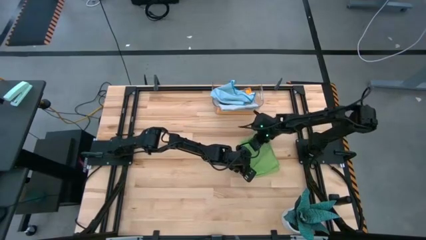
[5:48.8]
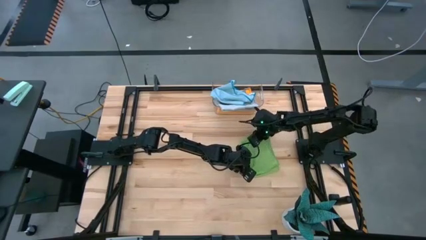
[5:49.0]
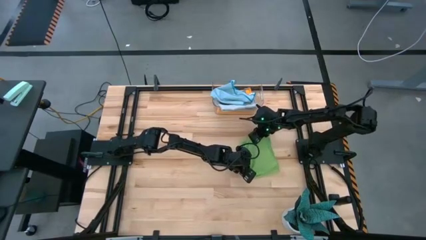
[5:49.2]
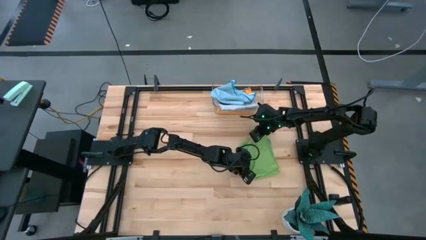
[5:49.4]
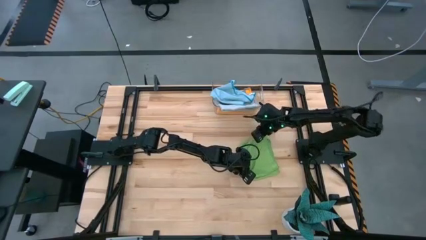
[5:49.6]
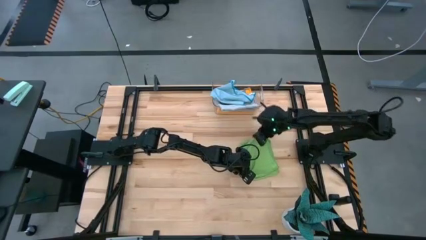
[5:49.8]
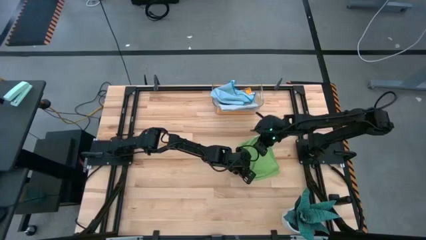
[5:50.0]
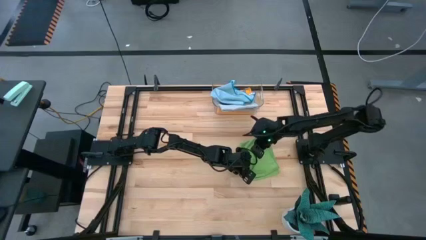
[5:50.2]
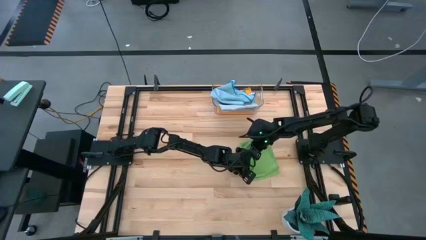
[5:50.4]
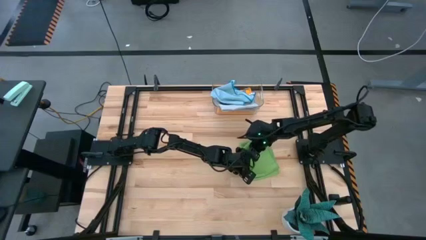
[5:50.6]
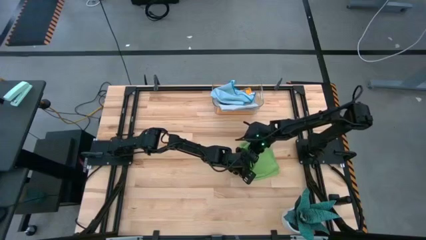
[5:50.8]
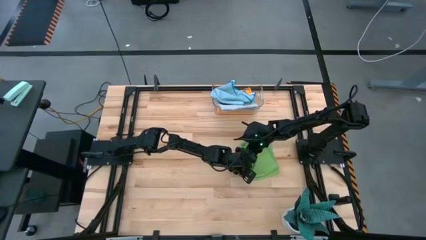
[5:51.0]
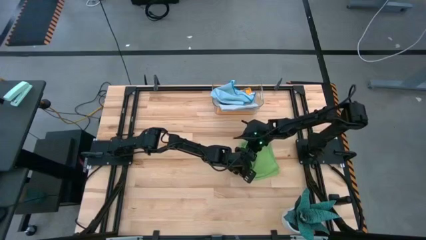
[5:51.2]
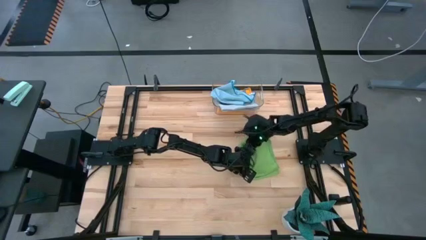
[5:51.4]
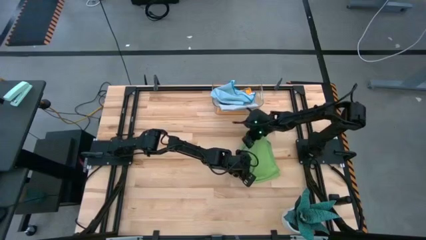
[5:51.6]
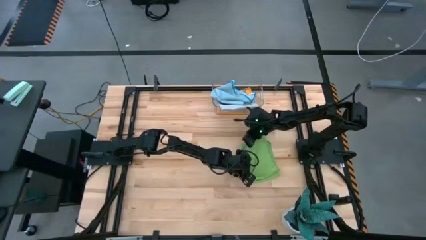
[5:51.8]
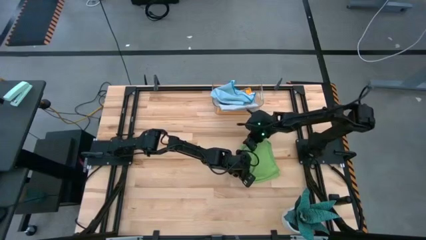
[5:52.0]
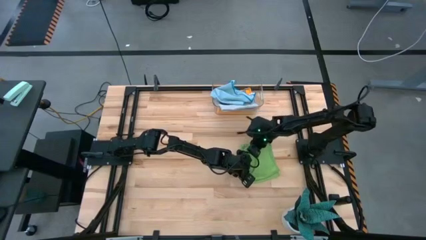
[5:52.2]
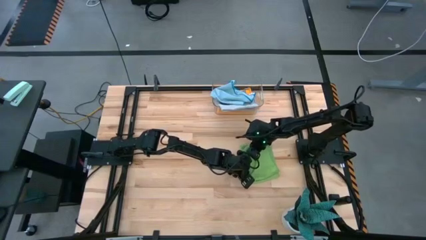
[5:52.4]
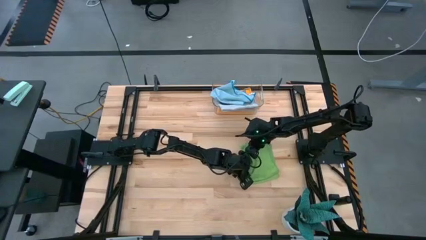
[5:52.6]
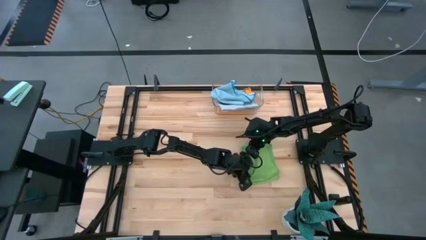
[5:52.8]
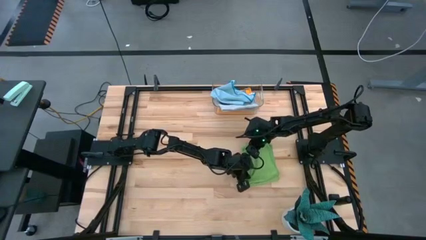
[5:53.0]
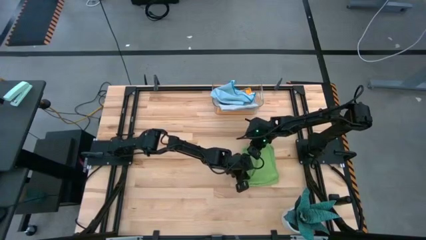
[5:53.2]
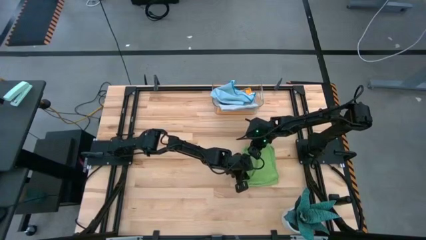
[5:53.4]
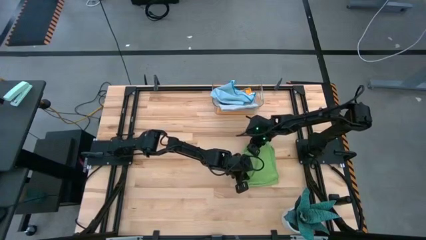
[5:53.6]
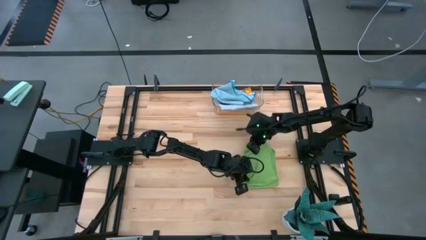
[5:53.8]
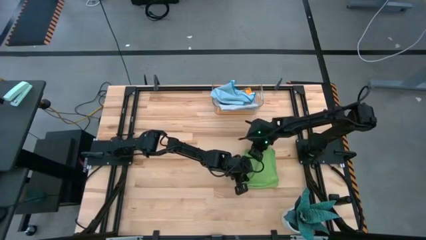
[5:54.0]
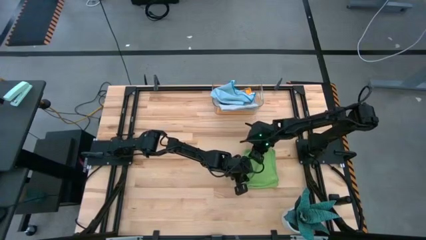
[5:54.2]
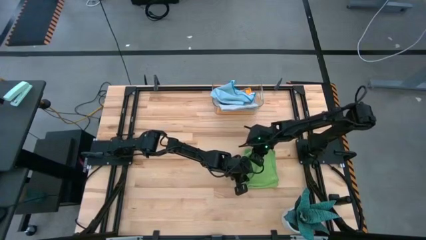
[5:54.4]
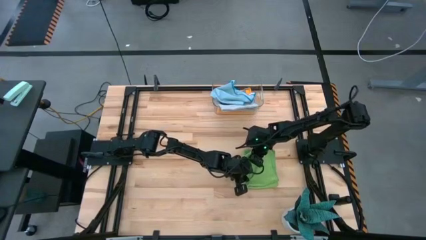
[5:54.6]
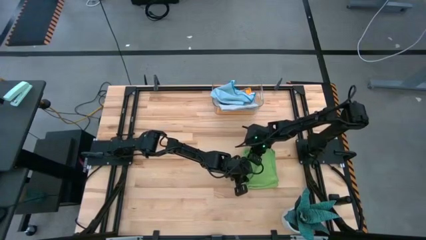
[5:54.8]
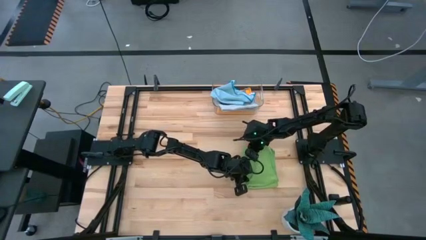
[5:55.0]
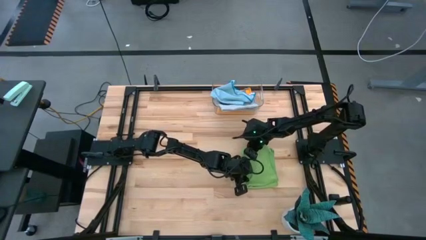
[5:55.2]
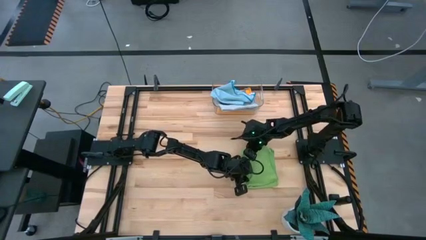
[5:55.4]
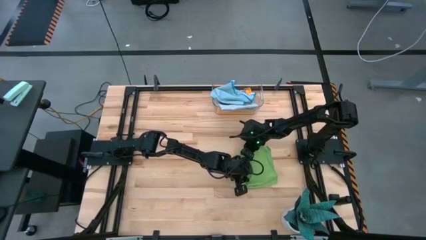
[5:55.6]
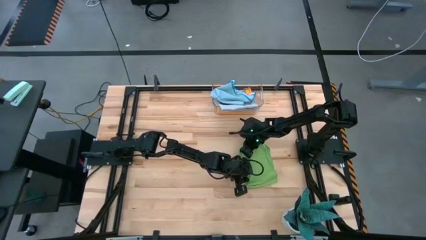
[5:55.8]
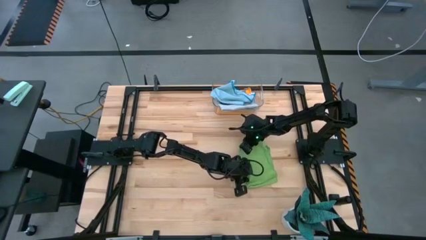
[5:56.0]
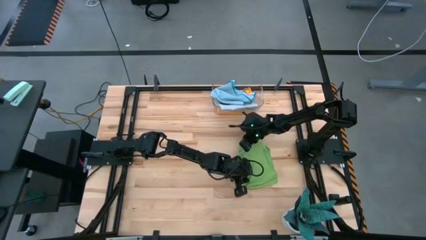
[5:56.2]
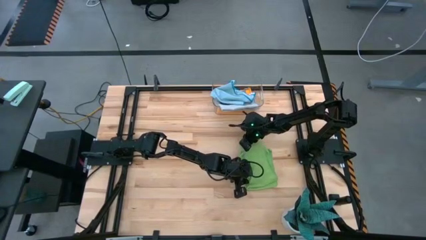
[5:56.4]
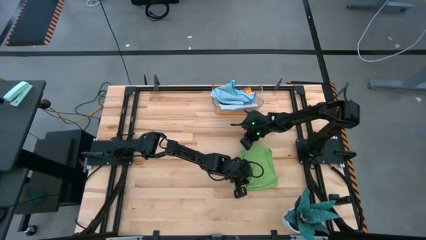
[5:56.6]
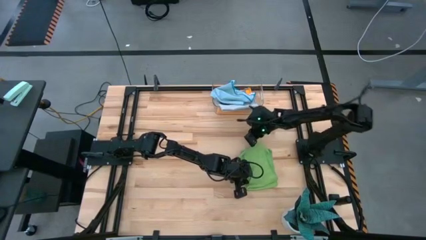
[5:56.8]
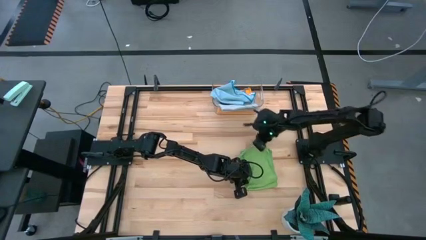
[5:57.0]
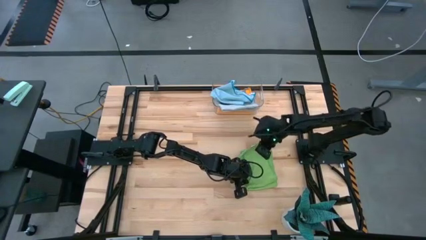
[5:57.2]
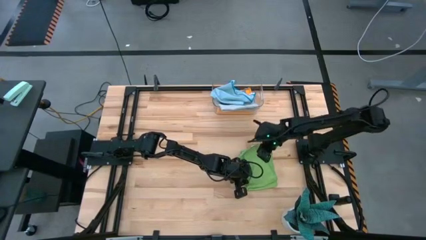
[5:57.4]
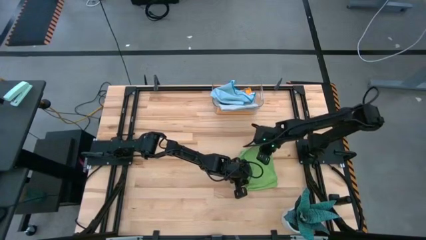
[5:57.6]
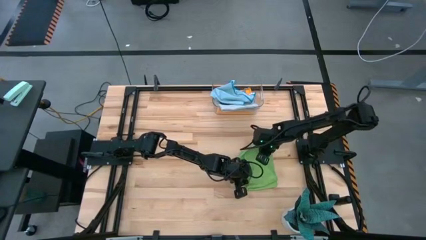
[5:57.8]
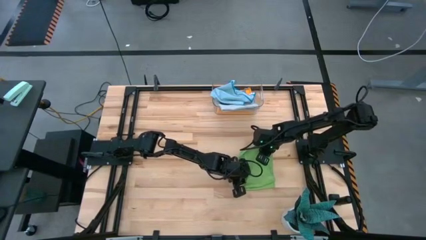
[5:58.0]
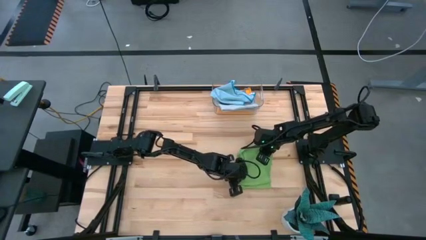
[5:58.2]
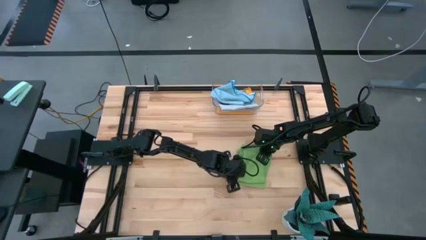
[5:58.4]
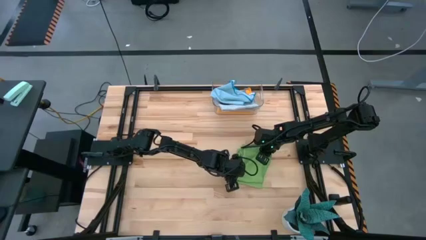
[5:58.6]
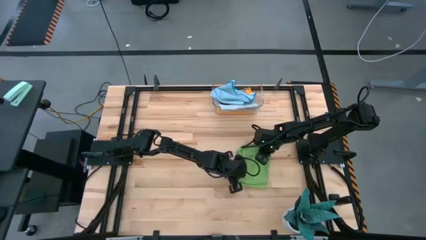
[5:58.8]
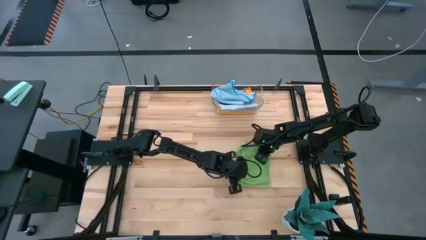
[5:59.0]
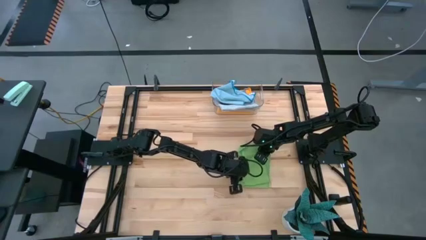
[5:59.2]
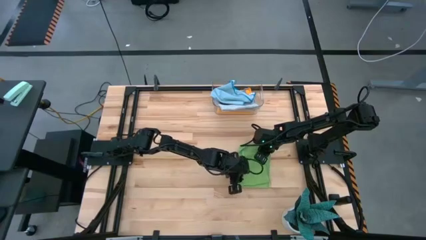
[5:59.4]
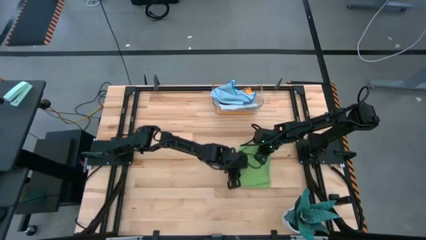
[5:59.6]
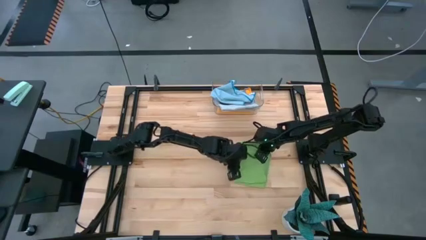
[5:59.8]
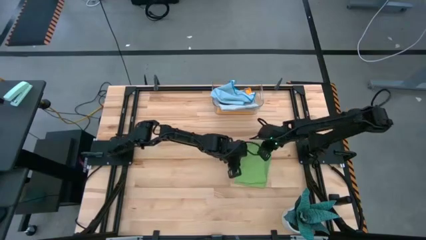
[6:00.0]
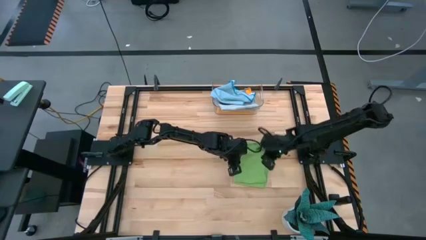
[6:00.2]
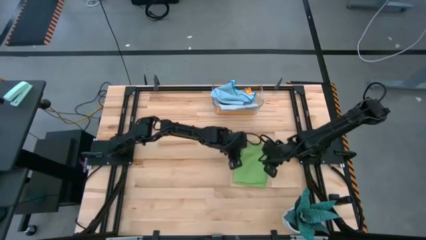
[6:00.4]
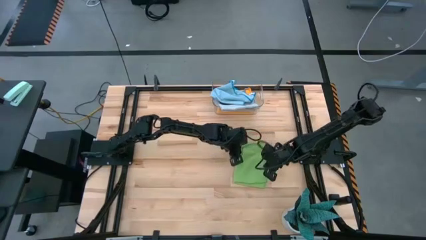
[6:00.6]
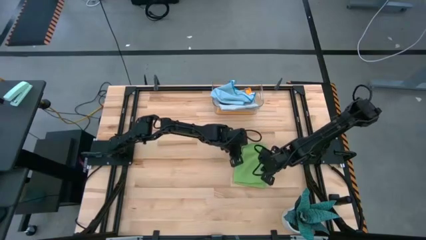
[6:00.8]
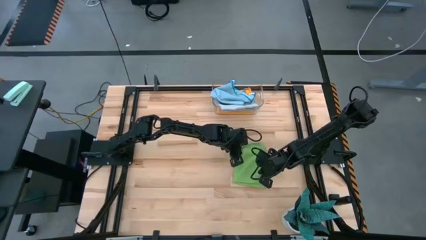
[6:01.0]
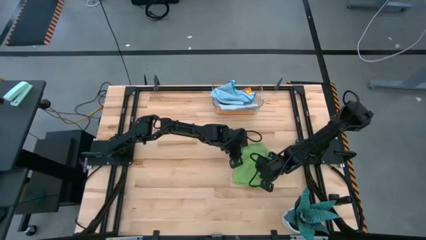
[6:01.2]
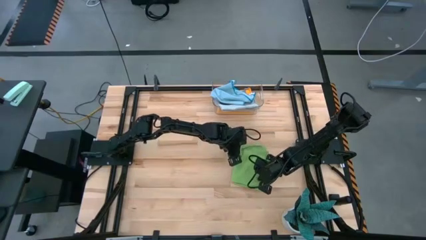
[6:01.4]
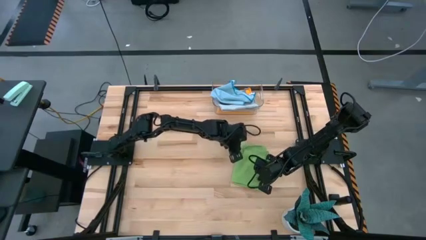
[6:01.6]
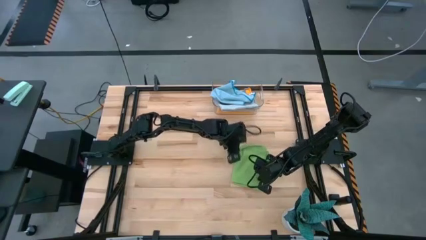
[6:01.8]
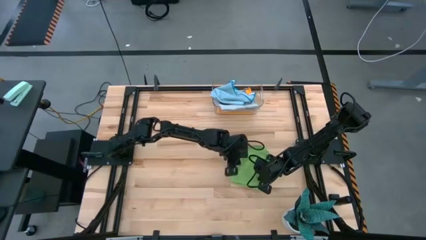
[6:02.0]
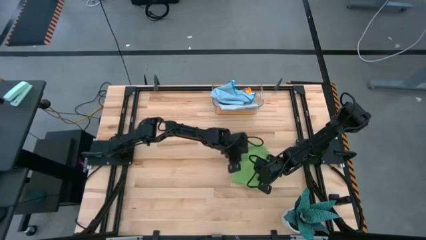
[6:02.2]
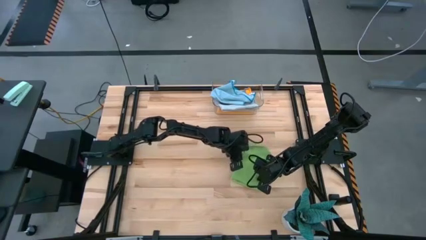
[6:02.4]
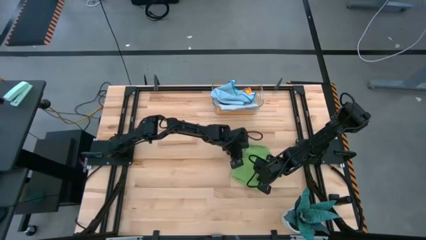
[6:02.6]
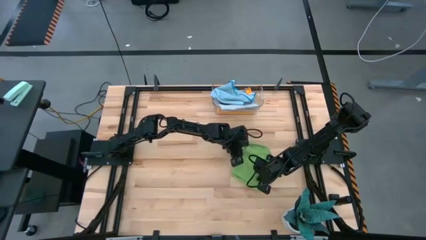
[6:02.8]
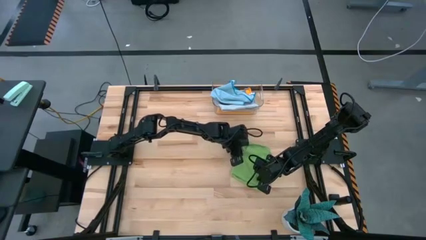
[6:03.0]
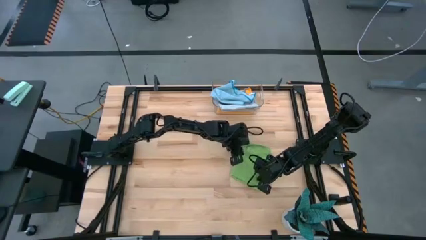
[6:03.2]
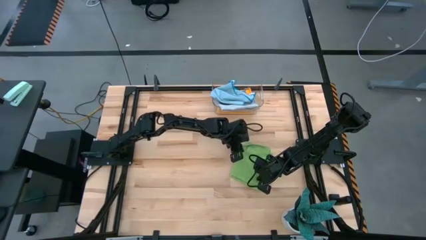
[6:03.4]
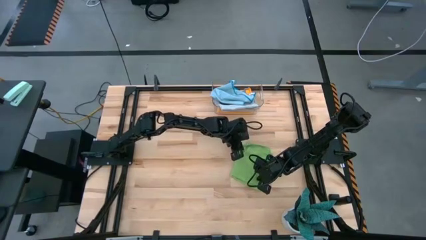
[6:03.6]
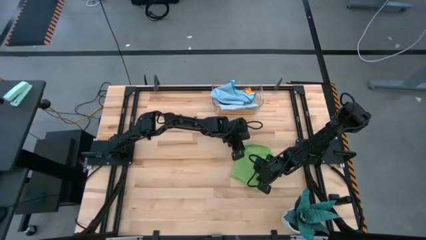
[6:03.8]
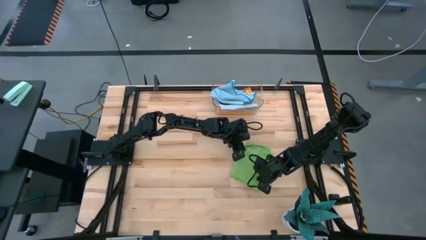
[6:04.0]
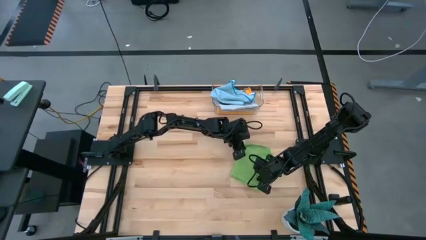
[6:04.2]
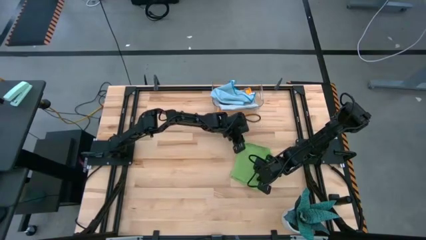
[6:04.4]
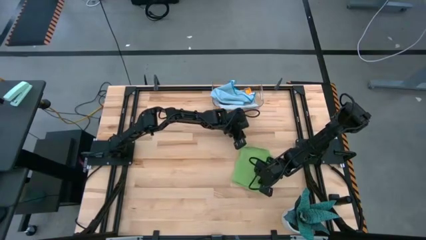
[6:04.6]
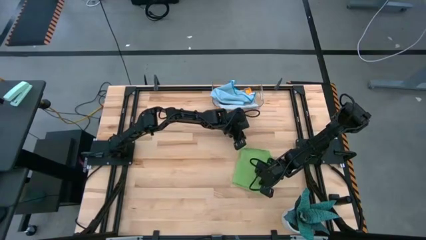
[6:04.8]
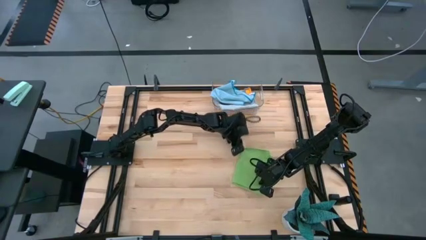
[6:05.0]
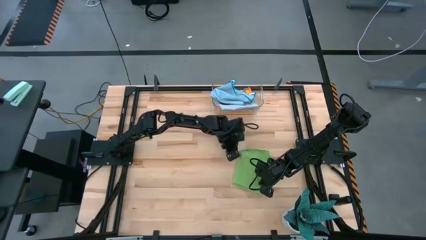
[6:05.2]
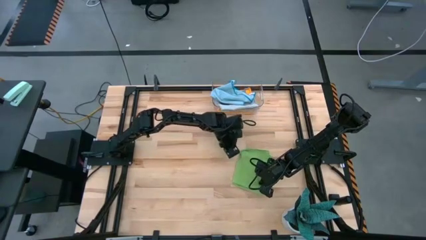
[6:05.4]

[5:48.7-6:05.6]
Task: Fold microfiber towels
Fold the green microfiber cloth
